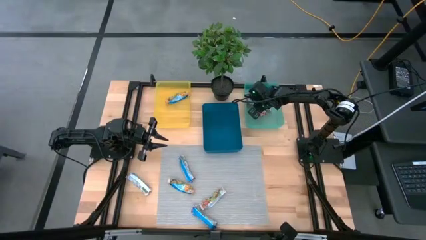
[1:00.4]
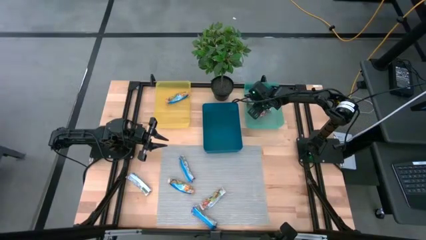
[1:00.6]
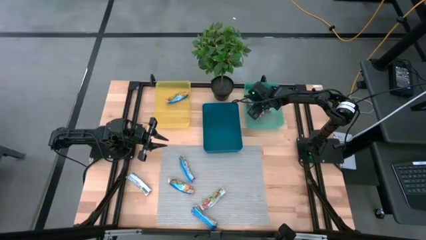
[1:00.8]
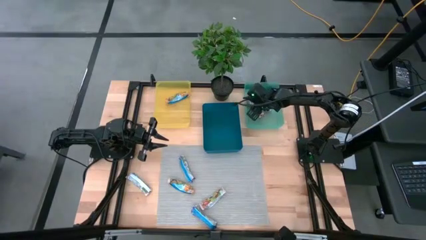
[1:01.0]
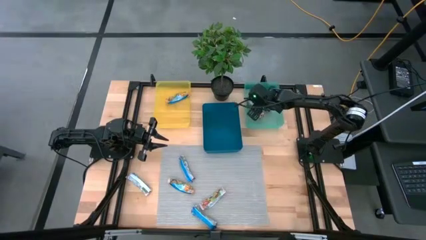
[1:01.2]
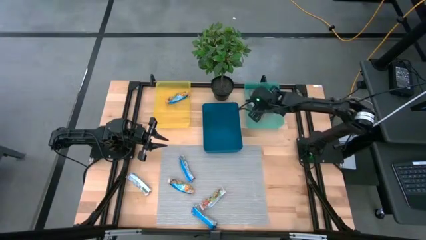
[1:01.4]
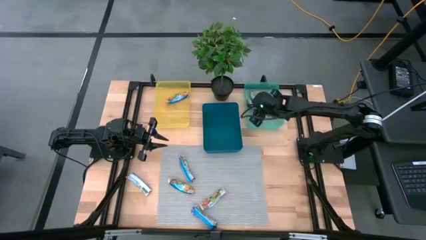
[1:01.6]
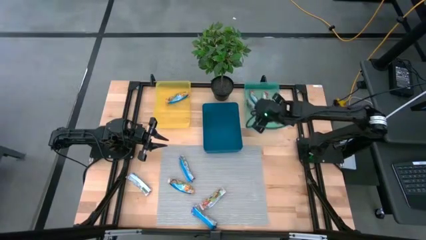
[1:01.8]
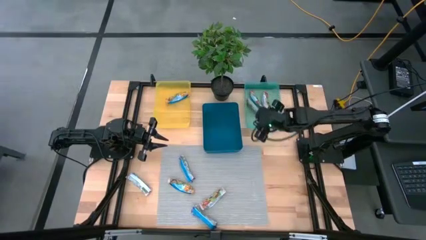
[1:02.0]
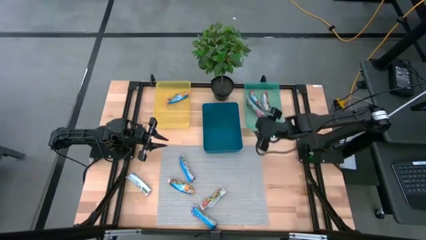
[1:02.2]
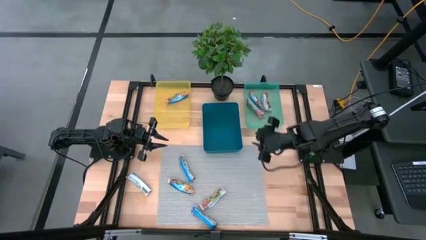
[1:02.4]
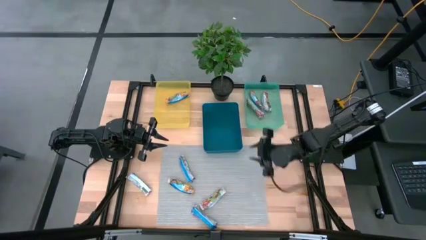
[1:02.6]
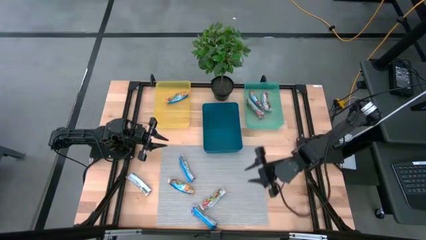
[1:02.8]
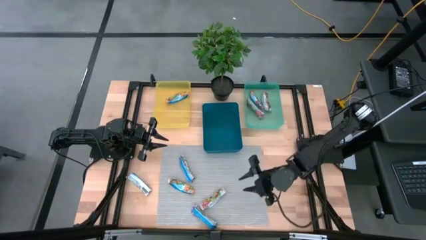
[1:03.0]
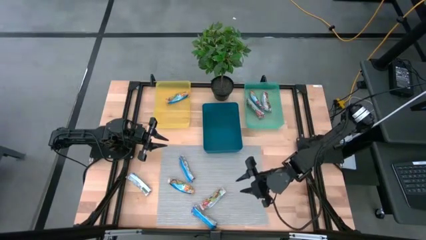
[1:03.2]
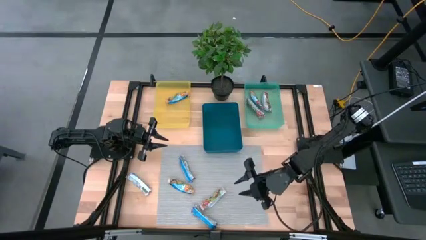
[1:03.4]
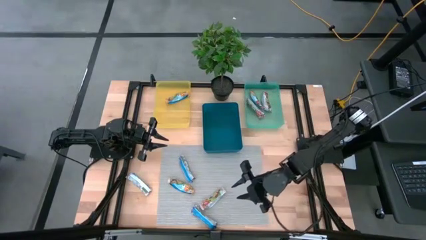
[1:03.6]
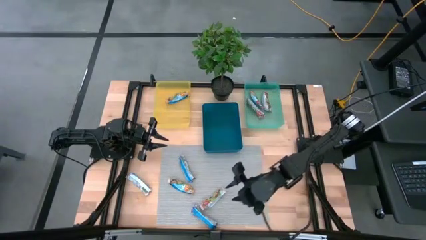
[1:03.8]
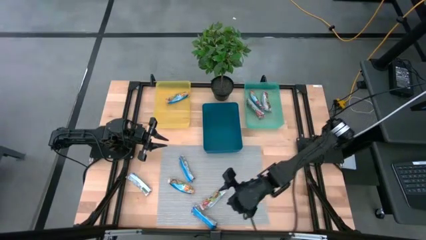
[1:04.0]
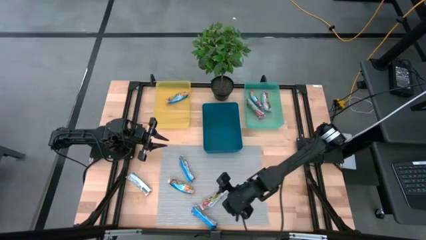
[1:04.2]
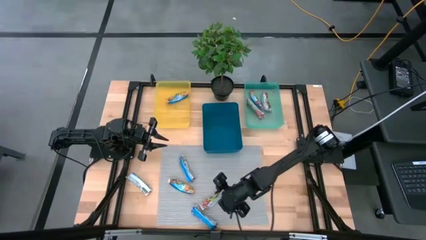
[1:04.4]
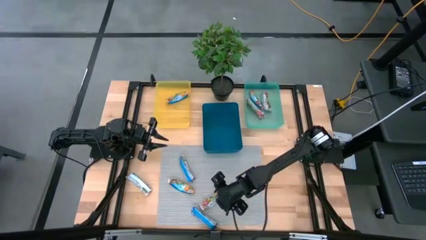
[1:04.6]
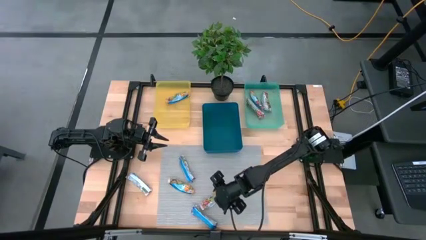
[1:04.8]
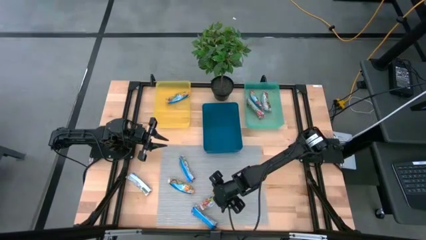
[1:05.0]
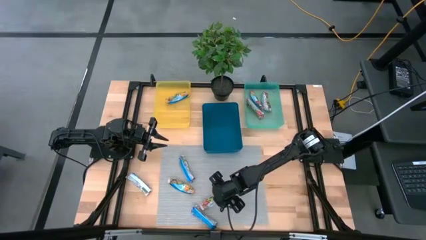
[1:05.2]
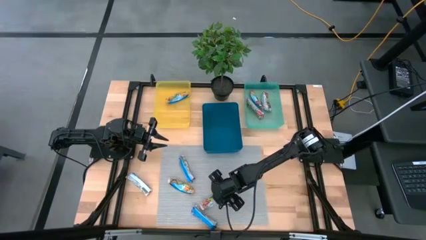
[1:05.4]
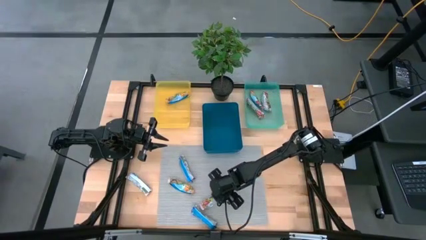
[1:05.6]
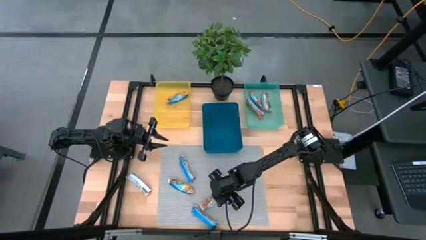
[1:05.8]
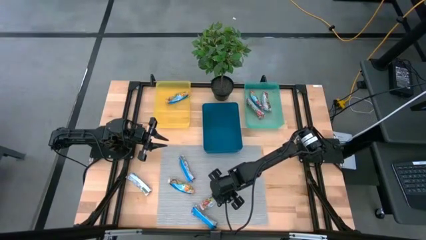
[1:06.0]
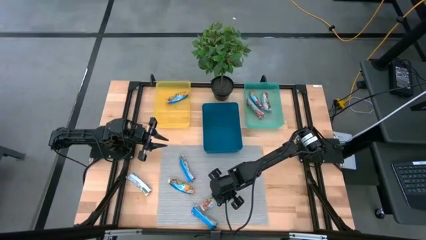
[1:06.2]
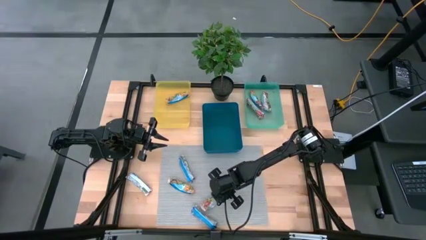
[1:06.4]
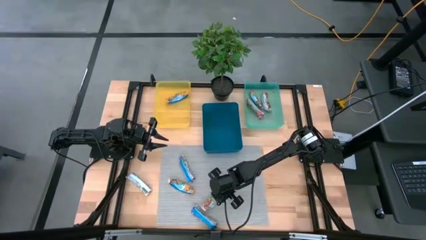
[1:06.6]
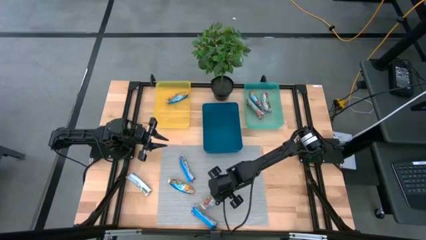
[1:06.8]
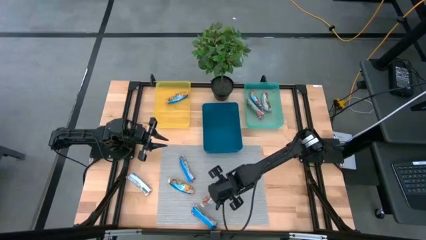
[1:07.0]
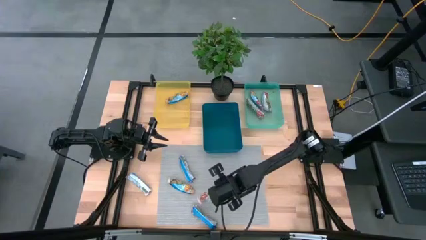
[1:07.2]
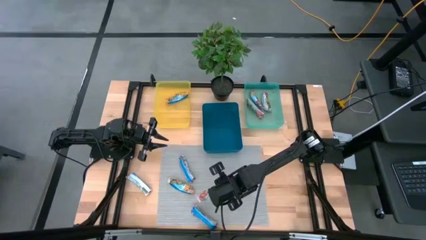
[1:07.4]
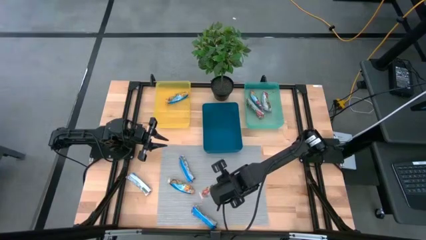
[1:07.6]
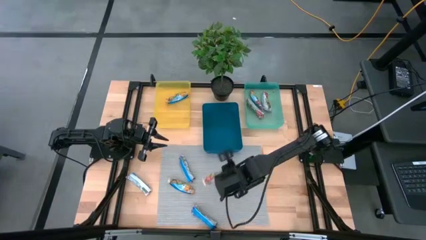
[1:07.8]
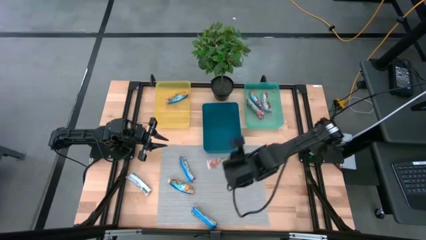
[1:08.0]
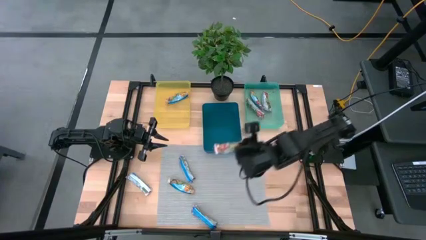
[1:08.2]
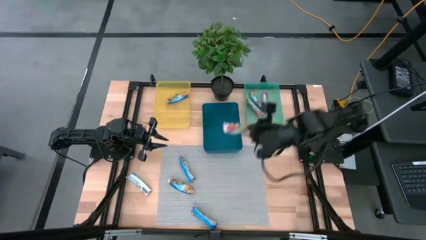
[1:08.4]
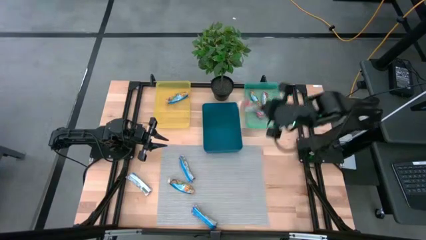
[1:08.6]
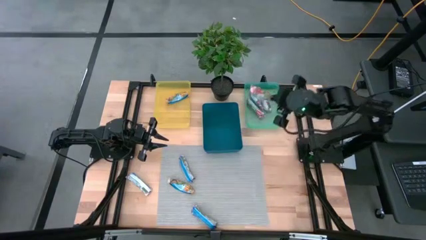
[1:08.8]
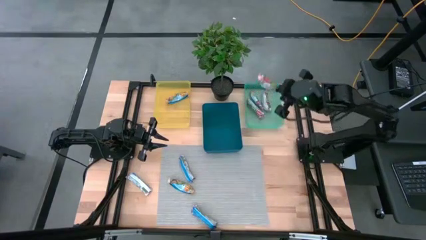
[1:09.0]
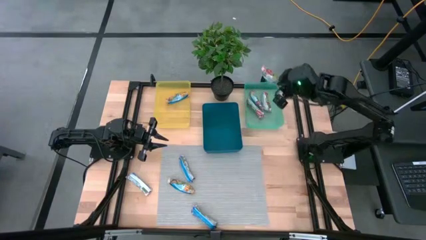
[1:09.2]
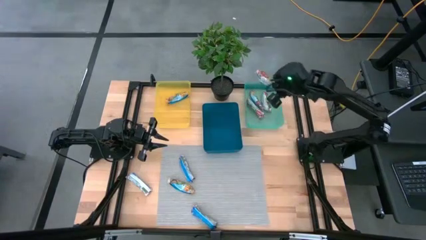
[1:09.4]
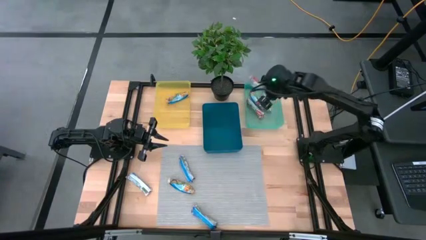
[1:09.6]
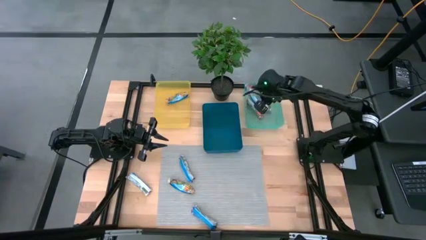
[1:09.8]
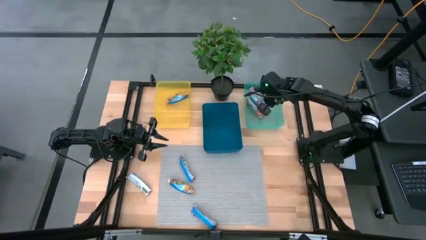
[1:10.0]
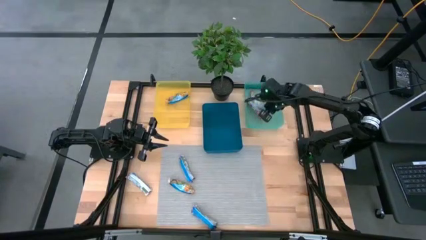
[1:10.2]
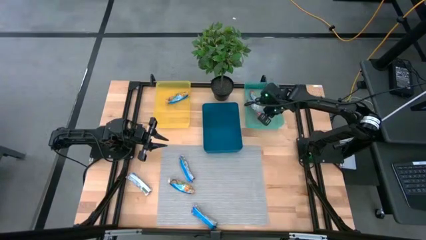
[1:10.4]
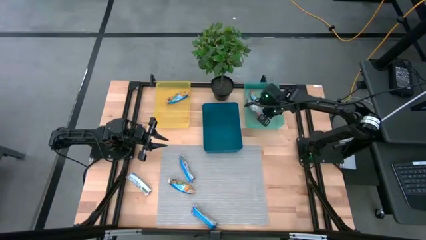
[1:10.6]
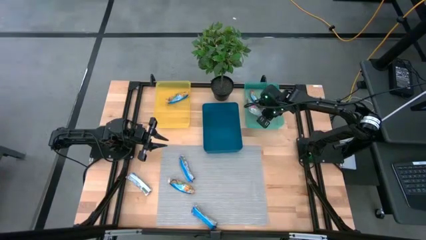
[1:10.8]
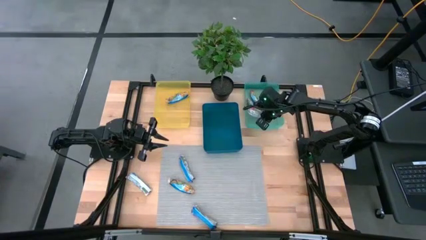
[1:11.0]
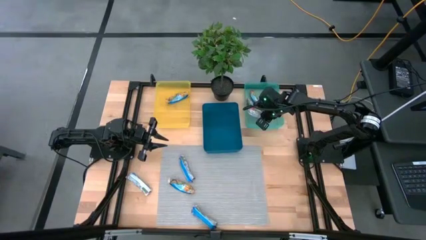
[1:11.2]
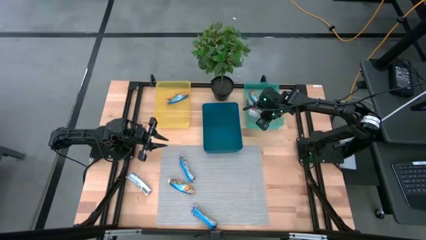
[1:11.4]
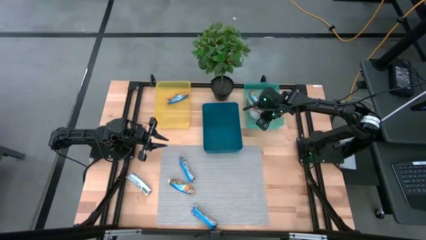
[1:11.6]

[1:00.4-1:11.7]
Task: Pick and place Granola Bars by type
Put the red granola bar into the green bin

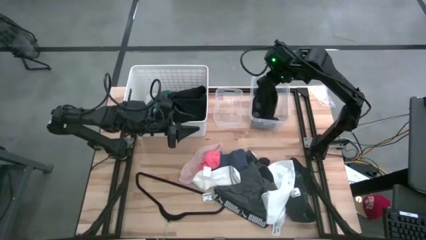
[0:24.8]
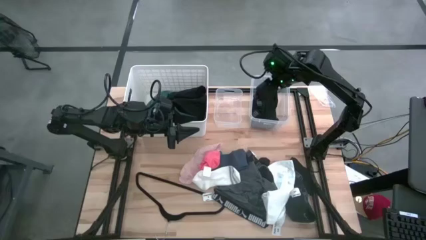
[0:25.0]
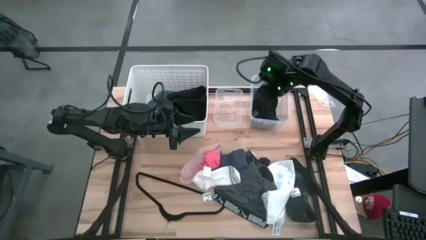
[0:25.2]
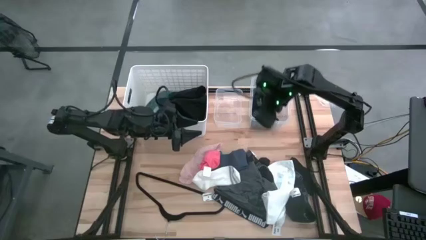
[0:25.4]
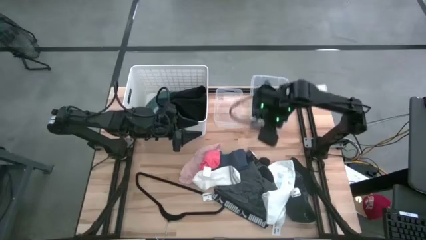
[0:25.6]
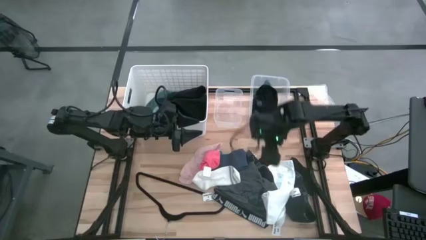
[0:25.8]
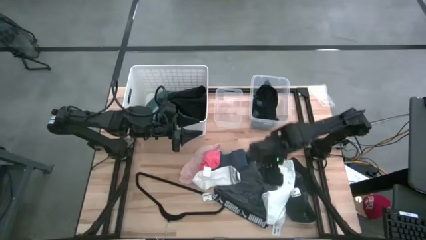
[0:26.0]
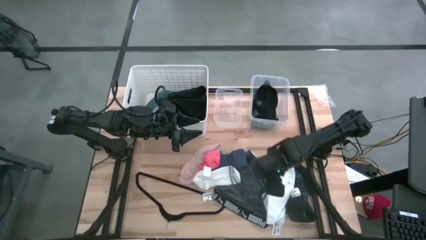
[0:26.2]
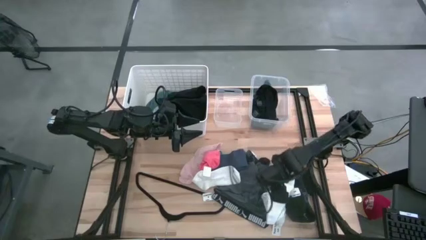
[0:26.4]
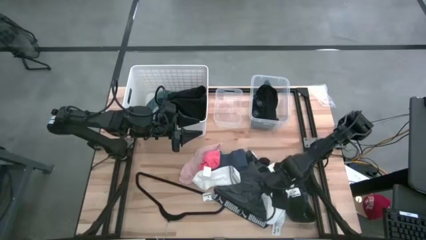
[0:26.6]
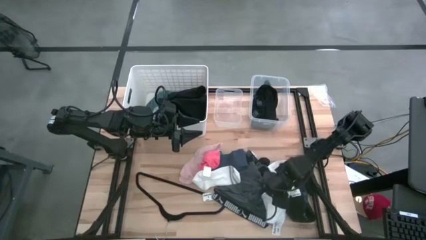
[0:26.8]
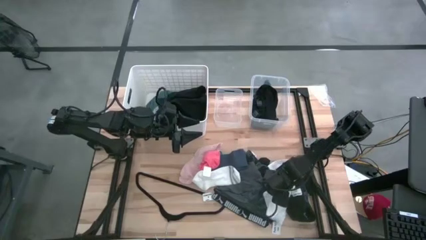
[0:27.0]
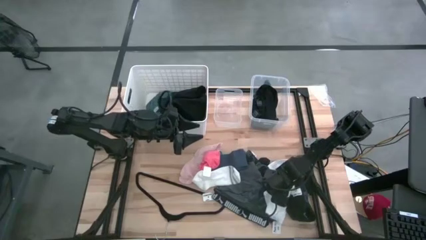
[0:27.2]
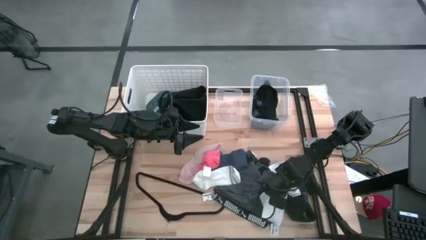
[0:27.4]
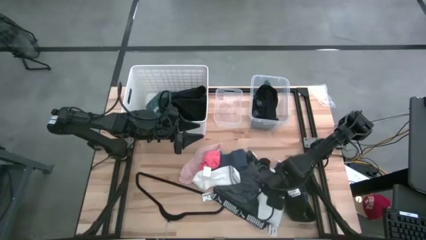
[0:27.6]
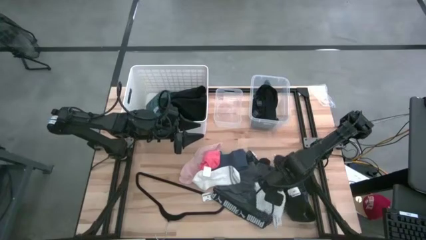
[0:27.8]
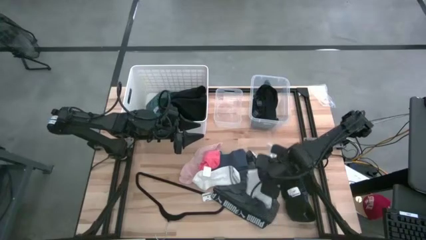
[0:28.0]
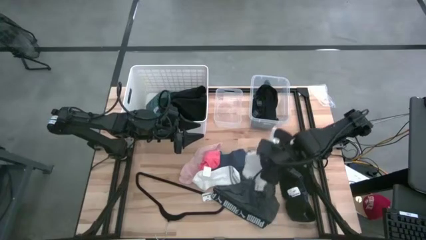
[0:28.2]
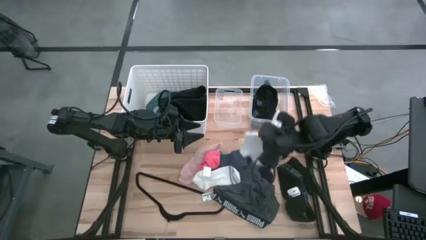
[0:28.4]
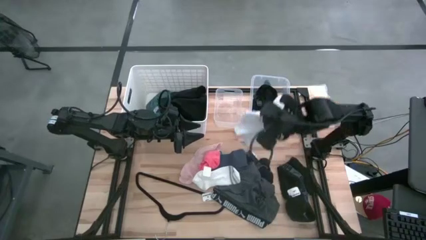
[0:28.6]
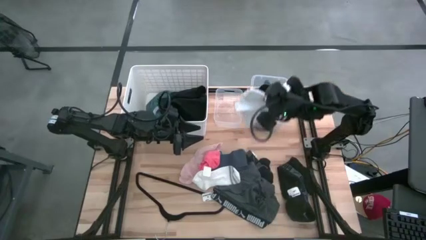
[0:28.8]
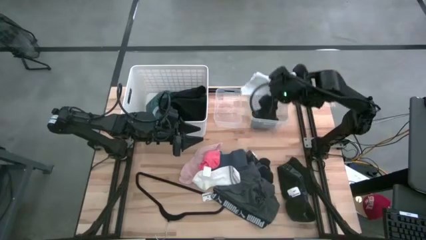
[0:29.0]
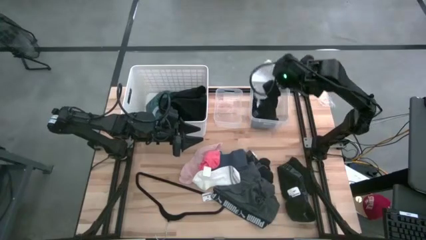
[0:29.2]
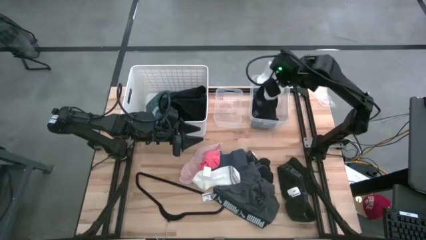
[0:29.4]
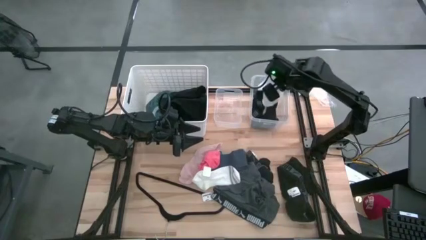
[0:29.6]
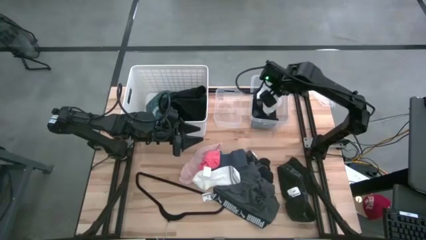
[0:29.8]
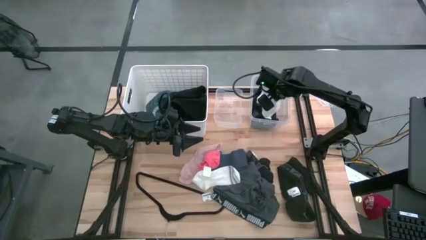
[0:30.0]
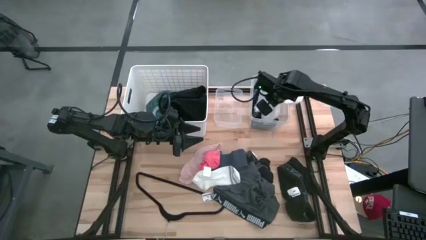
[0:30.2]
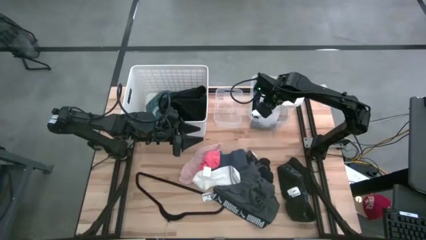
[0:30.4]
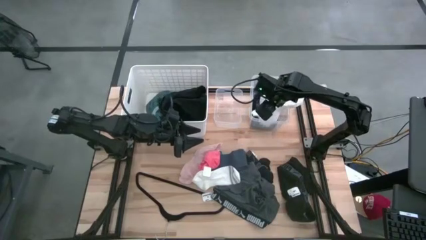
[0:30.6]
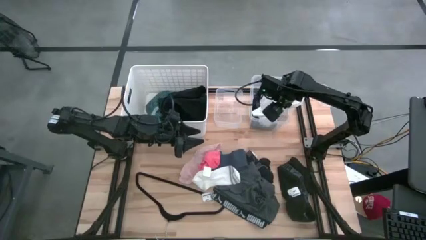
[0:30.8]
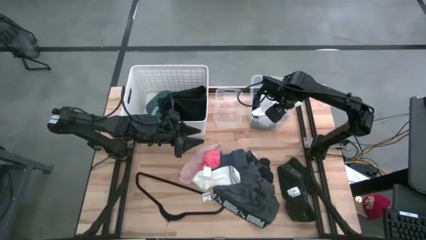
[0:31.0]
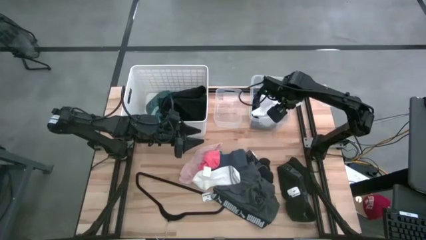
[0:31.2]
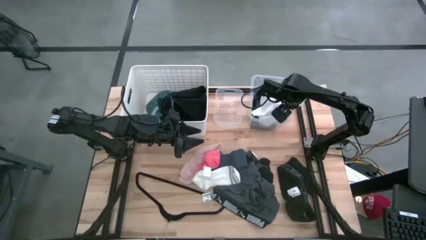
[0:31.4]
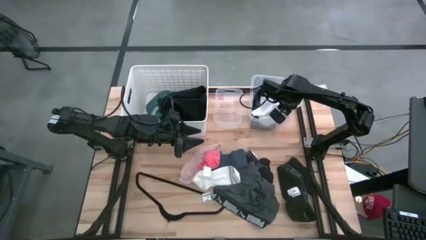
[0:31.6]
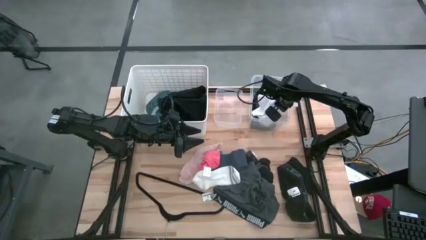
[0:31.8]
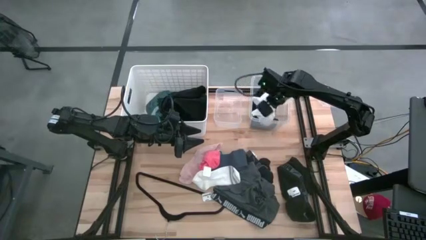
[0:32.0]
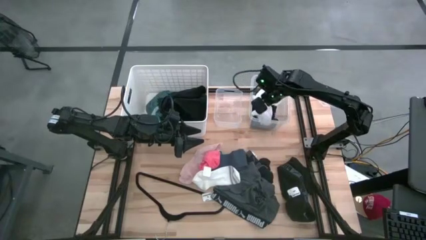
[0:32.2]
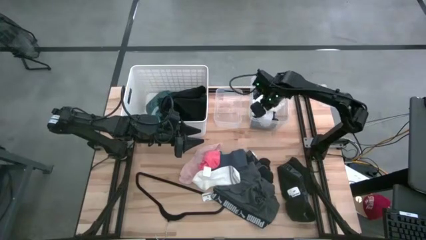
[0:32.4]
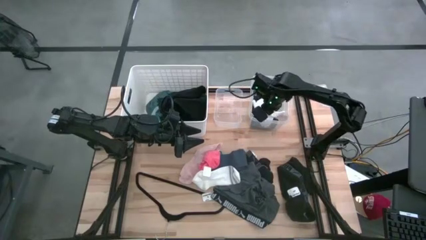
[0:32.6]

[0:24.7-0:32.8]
Task: Pick & Place Cloths
Put the white boxer into the large transparent bin
